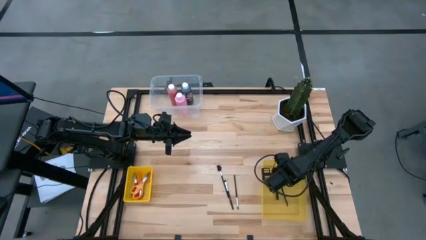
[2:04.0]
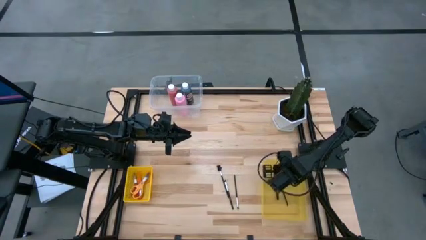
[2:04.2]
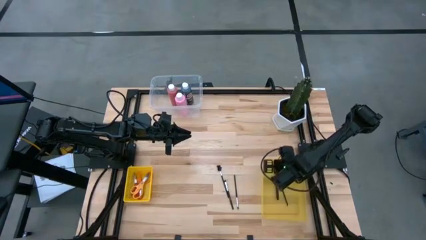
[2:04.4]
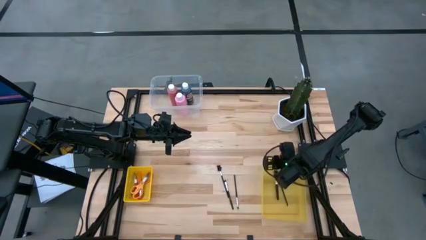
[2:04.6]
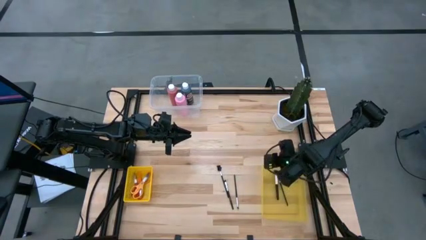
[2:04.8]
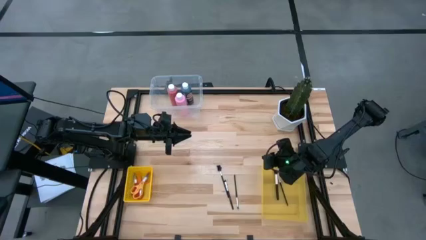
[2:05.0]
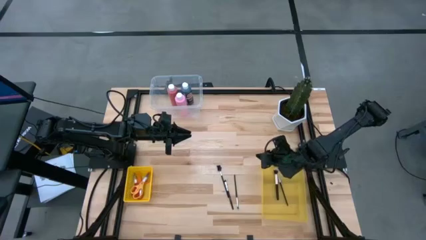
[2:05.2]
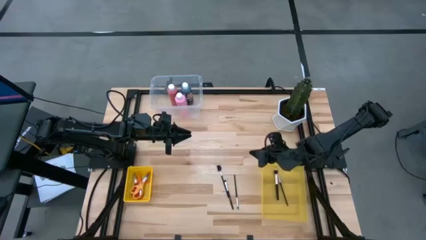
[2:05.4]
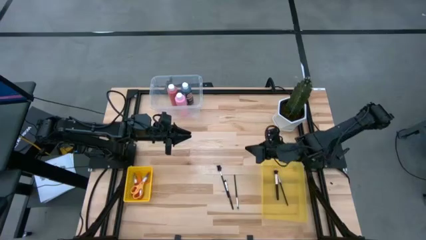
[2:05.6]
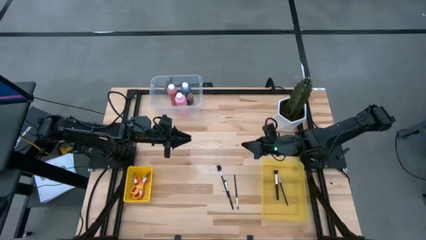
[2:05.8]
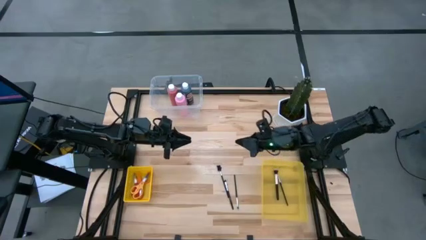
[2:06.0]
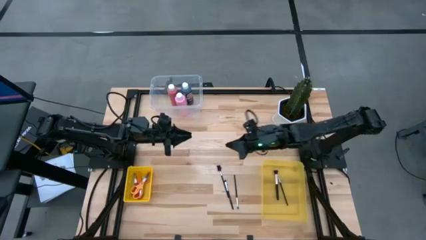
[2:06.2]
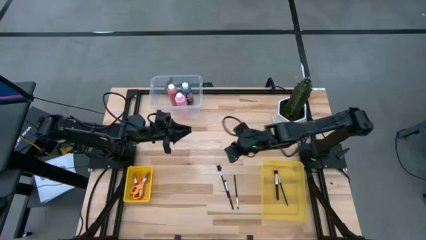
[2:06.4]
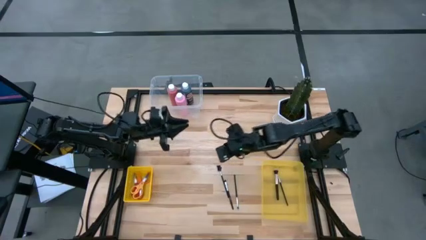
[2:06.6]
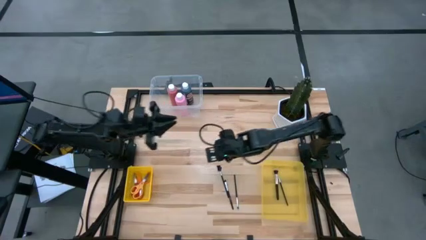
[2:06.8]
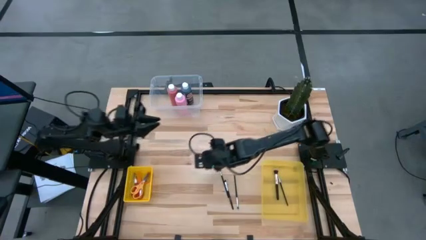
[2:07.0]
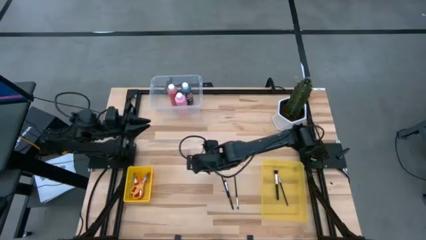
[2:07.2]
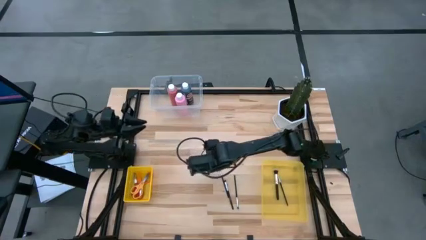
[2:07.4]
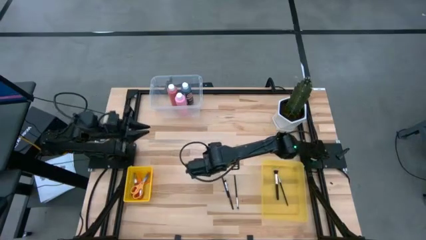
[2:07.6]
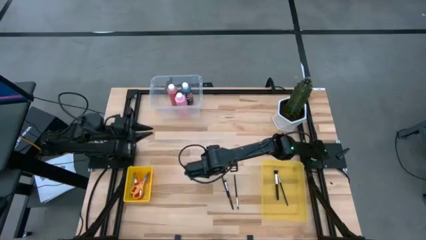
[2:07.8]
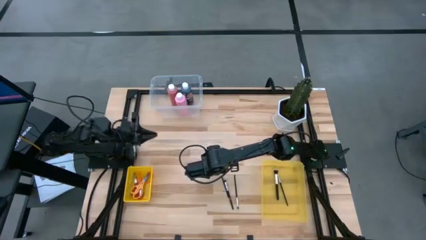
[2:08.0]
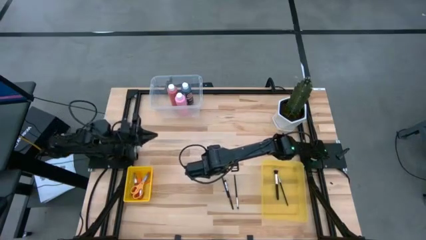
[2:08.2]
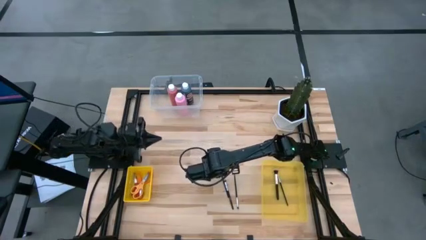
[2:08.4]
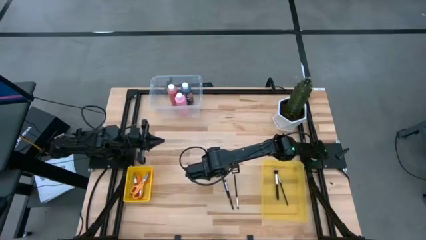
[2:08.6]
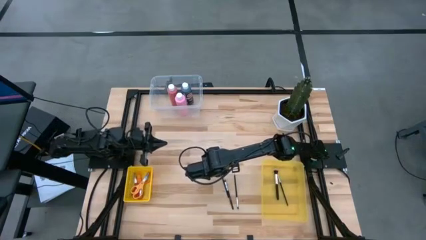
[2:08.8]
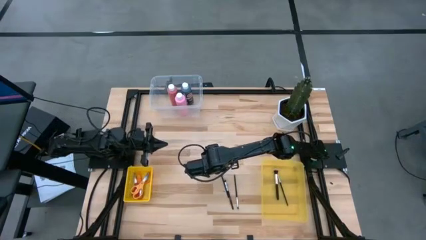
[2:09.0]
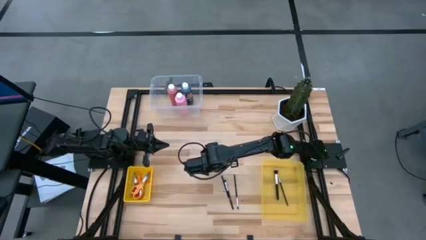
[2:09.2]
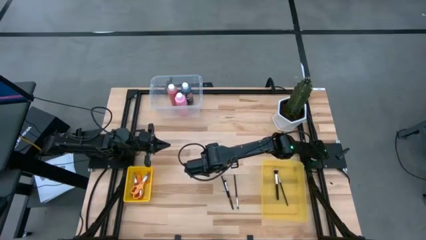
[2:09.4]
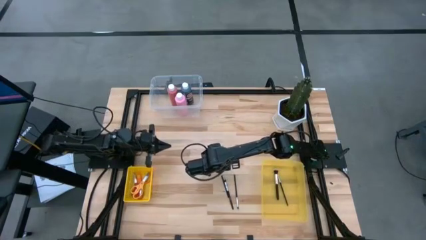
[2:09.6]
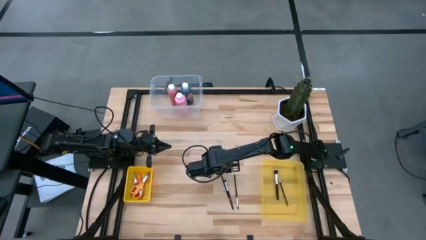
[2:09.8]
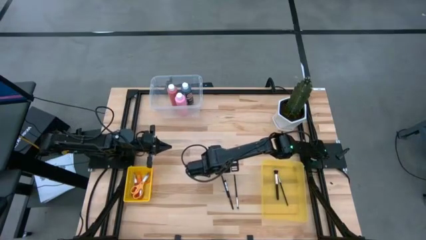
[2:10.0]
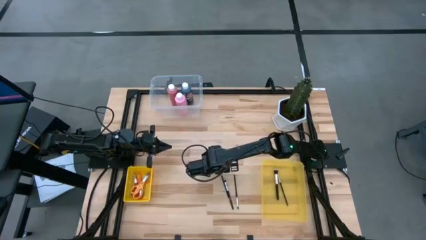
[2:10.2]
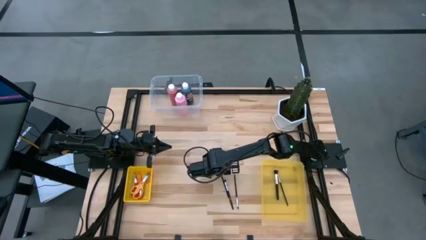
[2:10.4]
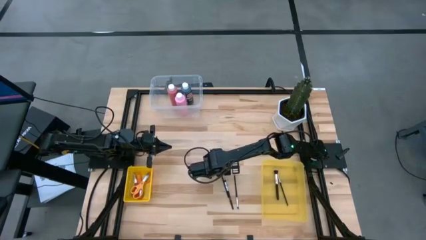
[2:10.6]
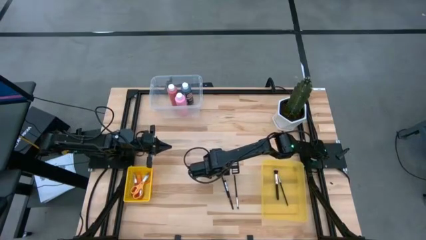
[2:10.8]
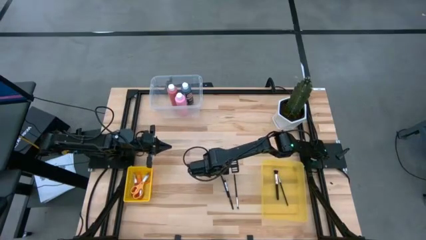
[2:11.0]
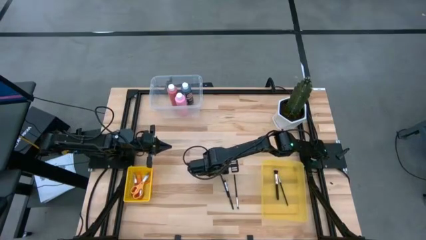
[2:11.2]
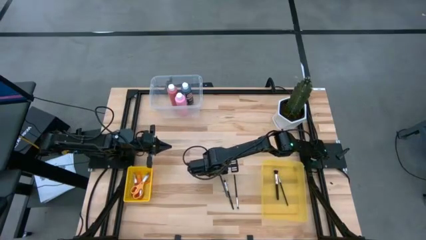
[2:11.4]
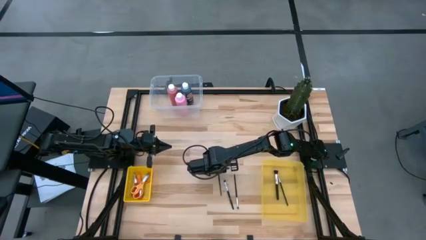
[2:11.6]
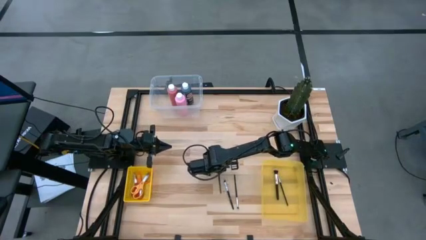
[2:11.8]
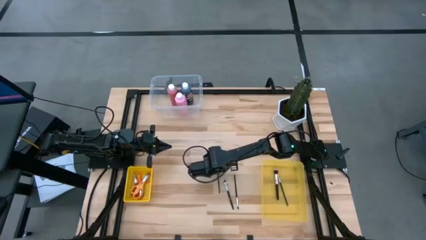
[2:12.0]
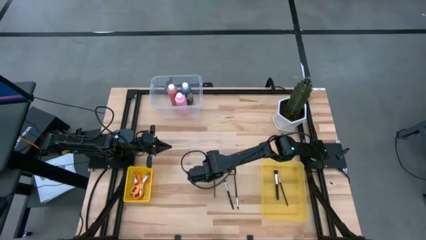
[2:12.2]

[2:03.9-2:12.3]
Task: Pick & Place Paint Supplies
Put the brow brush into the yellow bin

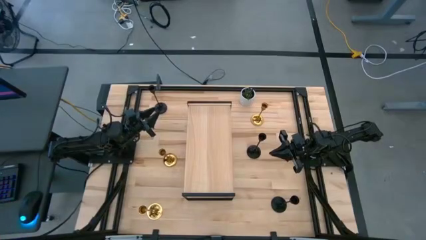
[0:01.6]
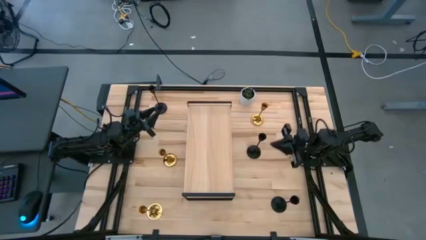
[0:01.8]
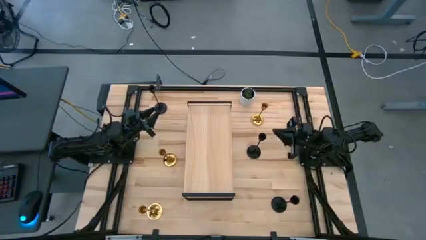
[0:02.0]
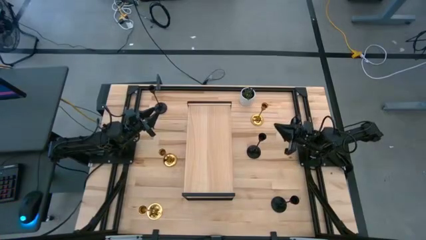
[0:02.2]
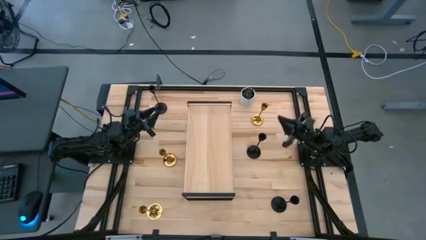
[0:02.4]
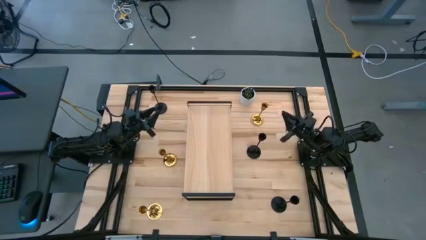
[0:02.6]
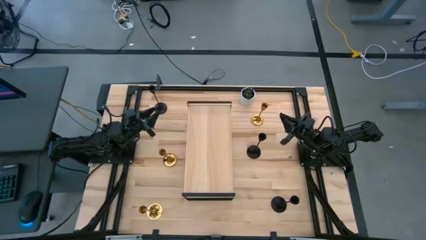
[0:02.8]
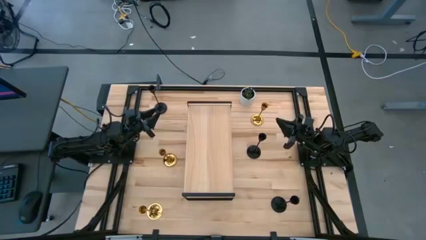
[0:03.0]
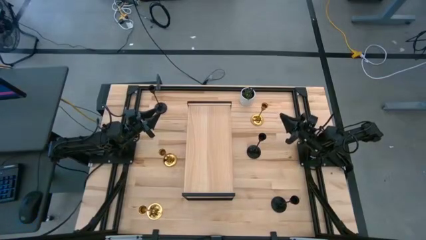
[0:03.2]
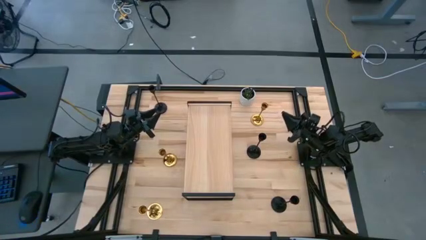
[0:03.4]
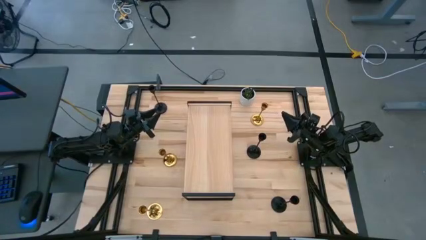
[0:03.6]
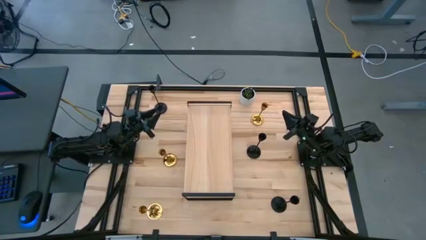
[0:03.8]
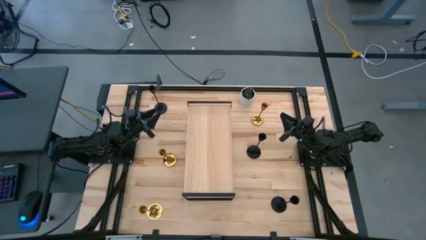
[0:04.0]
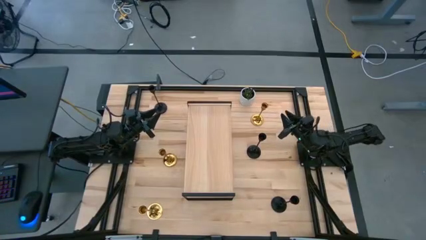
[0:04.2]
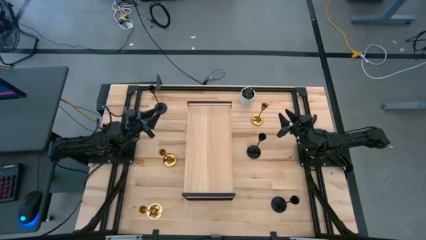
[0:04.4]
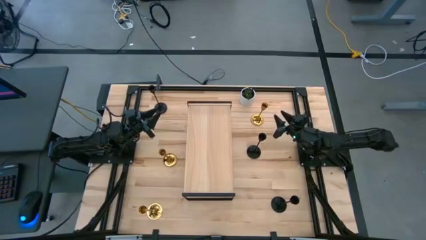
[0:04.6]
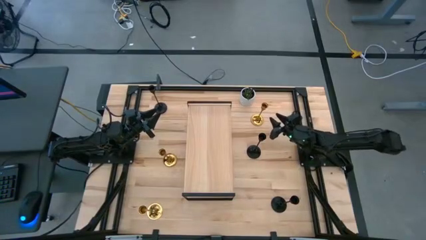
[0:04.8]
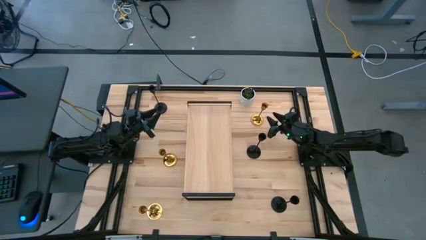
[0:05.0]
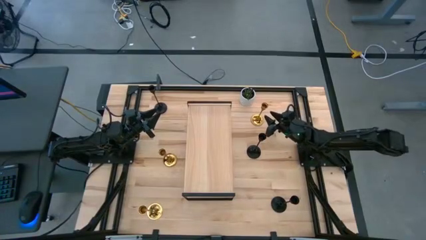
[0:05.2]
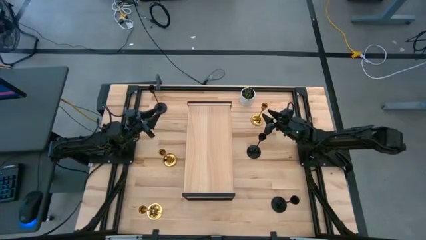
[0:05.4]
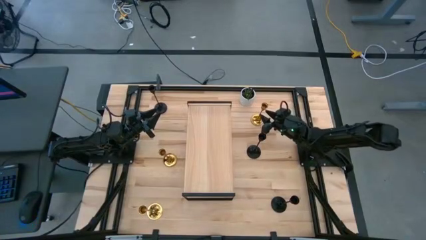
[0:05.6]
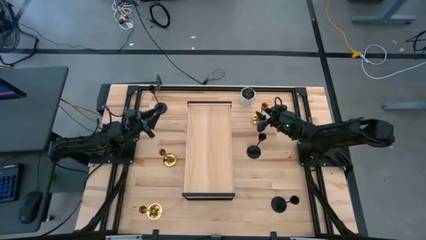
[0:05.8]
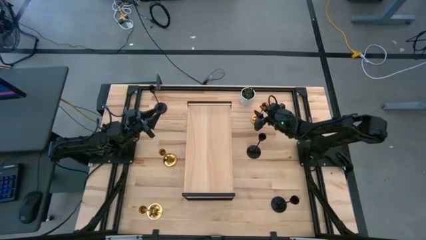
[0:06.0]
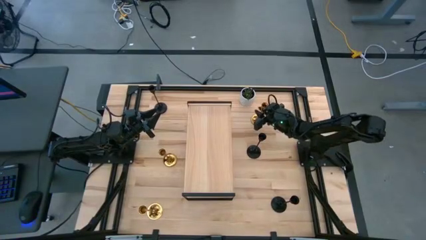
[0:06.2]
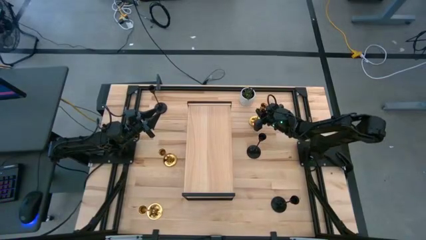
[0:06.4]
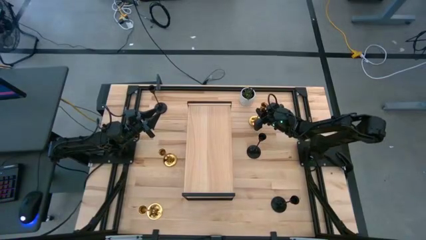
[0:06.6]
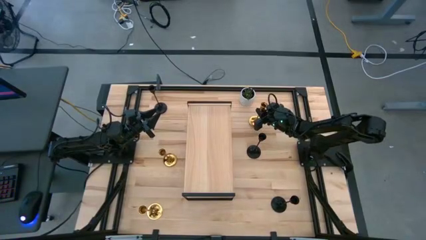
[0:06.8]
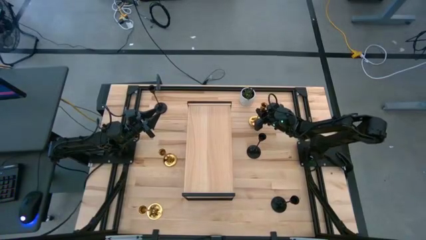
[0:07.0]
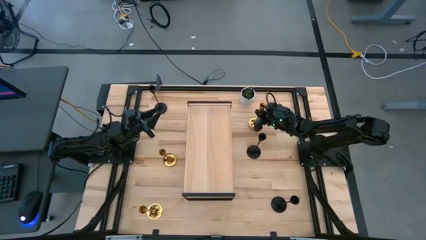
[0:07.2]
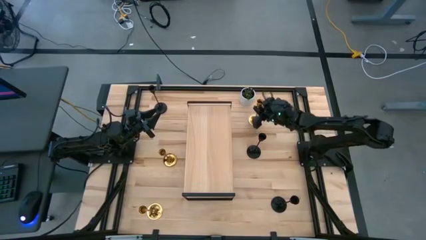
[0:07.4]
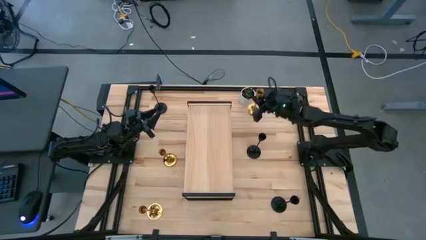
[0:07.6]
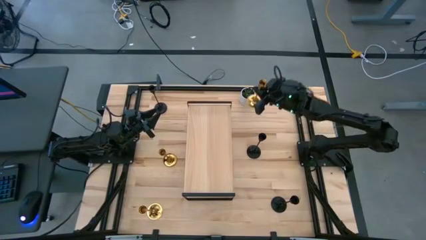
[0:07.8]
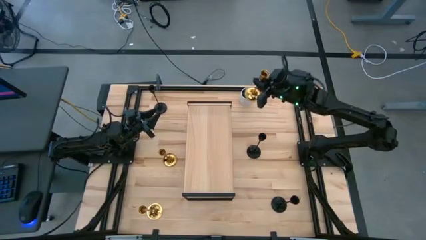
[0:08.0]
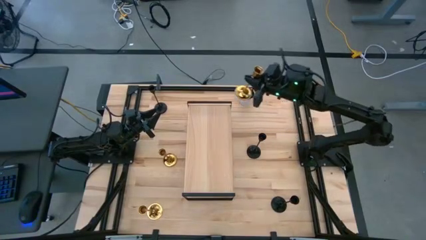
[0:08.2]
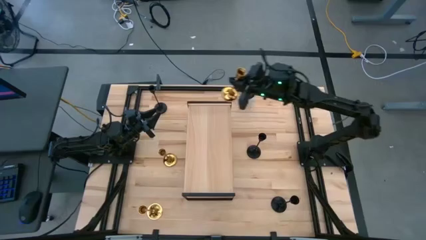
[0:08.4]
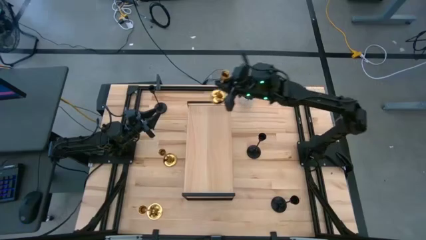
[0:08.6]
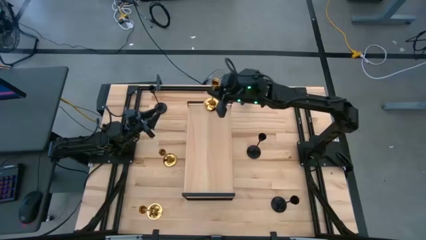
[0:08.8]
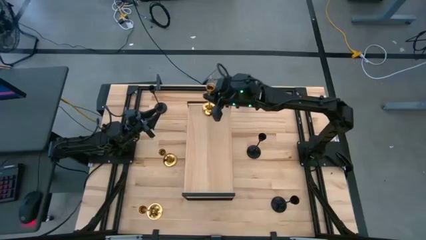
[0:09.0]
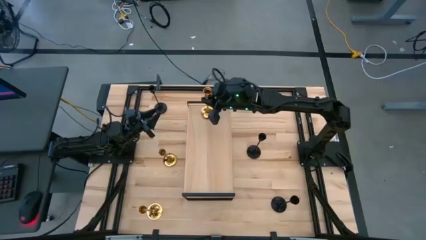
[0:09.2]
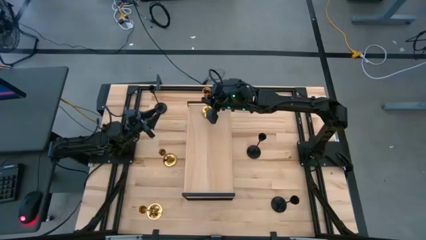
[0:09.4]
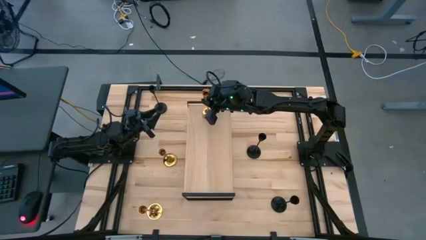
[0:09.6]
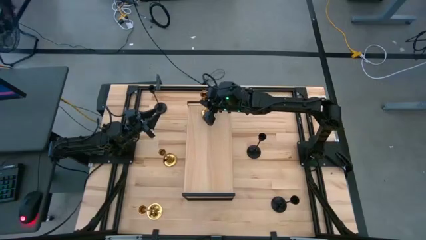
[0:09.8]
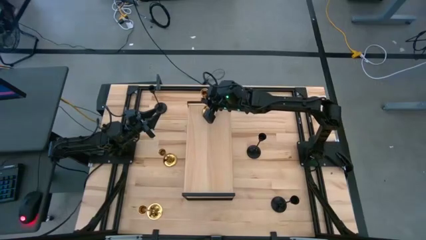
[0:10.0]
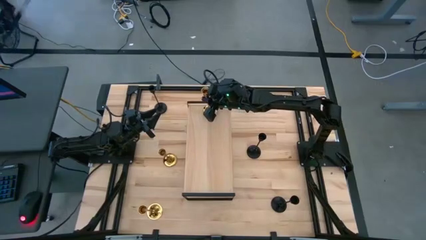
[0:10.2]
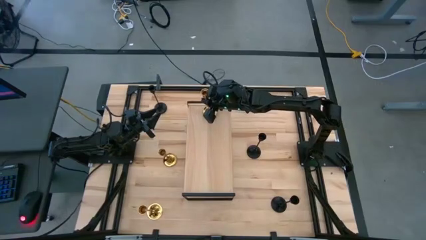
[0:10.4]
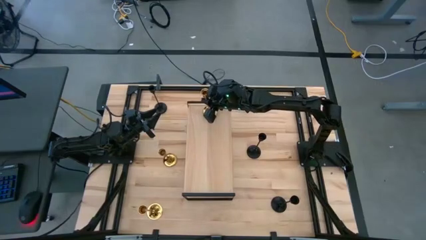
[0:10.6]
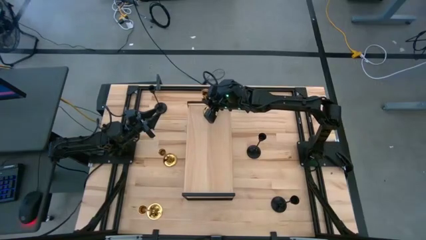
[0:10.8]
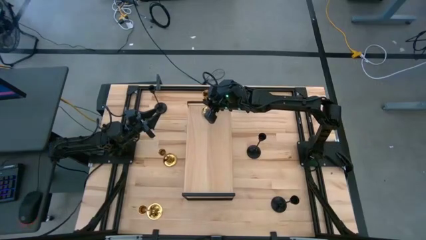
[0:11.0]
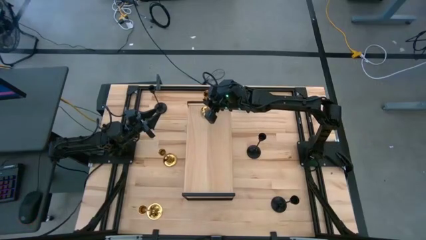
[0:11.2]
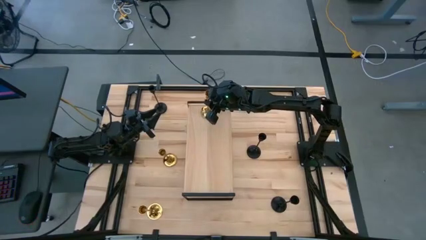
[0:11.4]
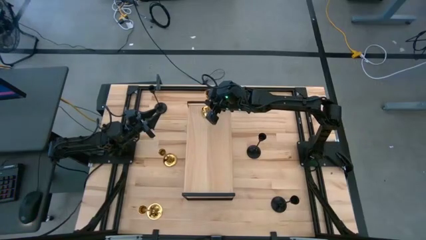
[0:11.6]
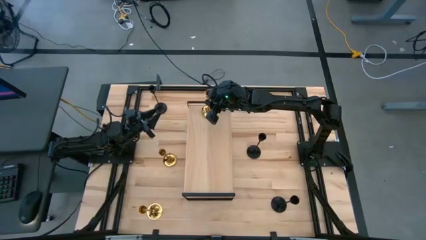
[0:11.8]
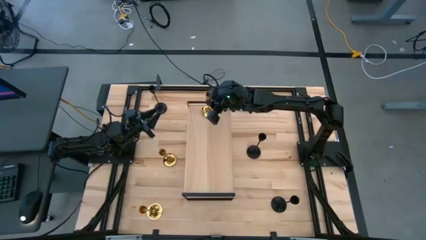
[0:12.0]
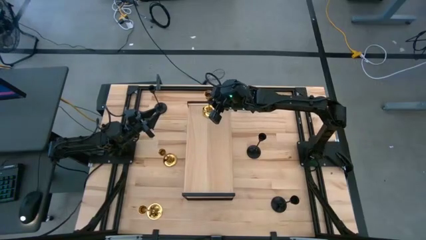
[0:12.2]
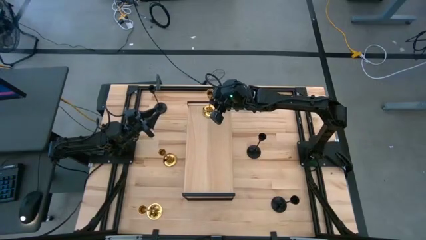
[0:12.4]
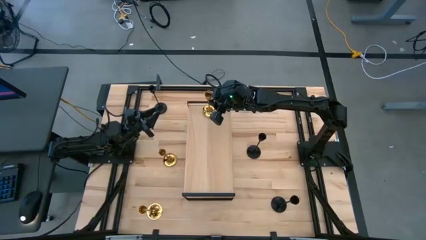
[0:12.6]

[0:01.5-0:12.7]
Task: Pick & Place candle stick holders
Put the top right gold candle holder on the shelf
